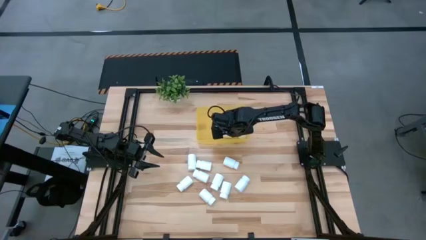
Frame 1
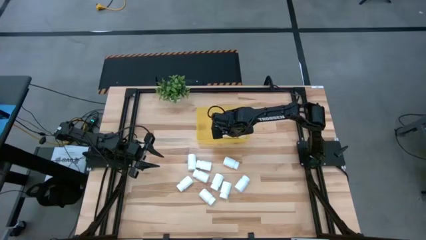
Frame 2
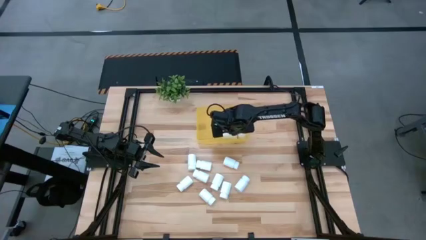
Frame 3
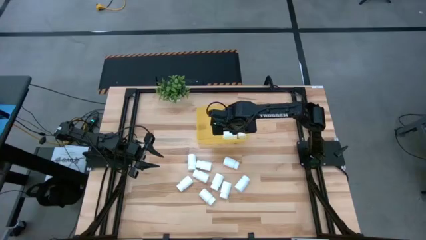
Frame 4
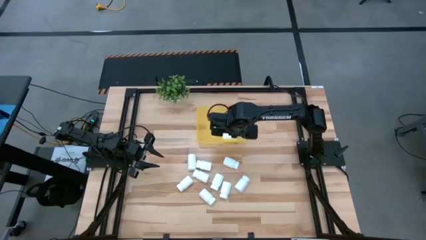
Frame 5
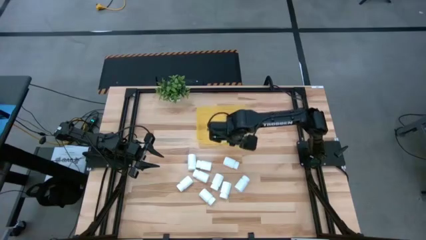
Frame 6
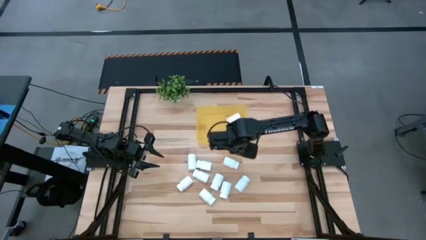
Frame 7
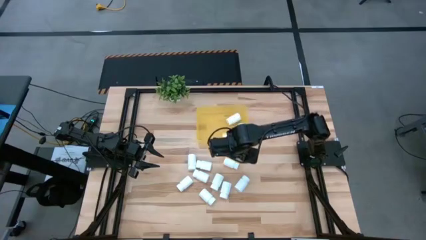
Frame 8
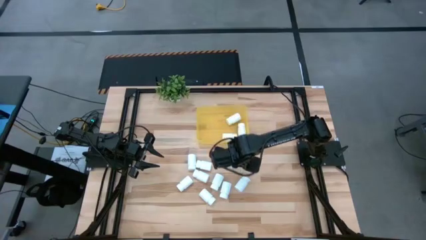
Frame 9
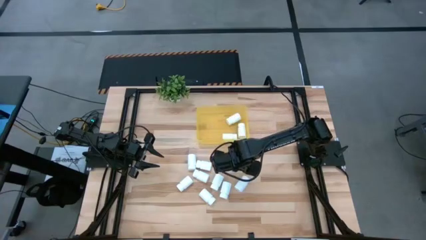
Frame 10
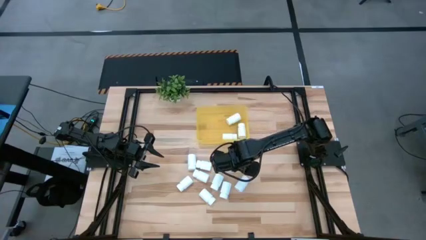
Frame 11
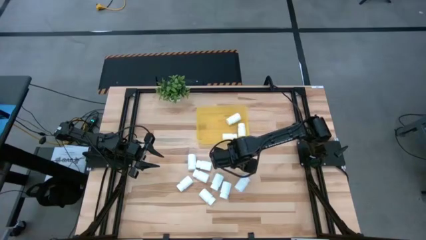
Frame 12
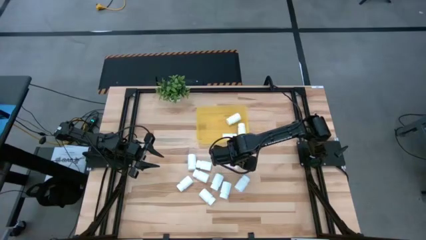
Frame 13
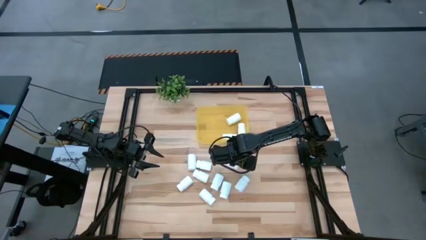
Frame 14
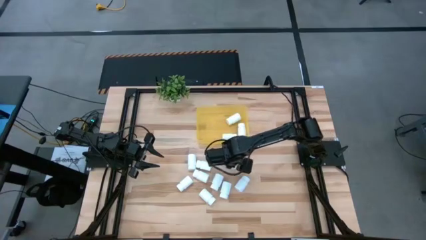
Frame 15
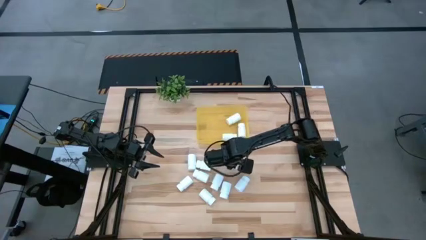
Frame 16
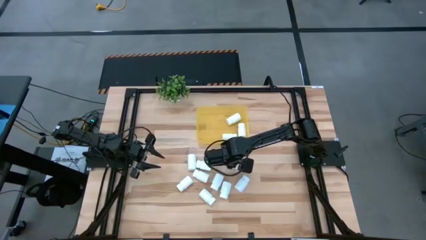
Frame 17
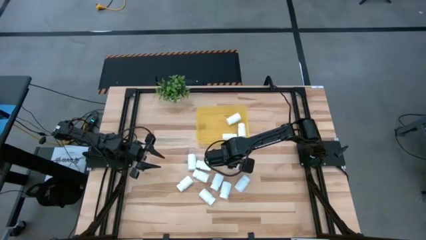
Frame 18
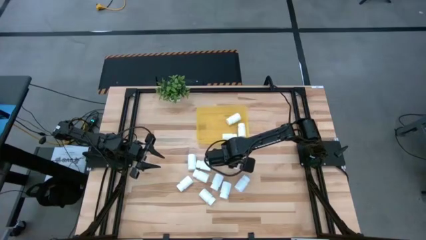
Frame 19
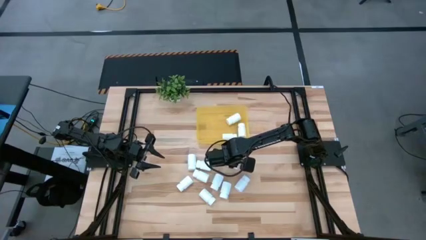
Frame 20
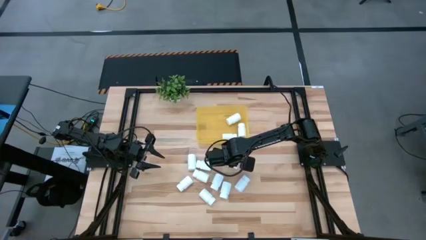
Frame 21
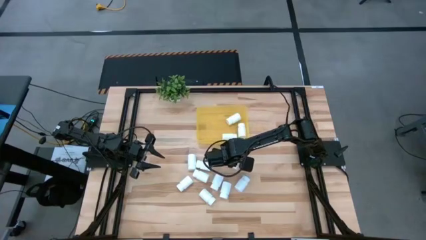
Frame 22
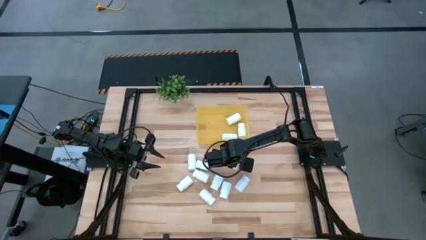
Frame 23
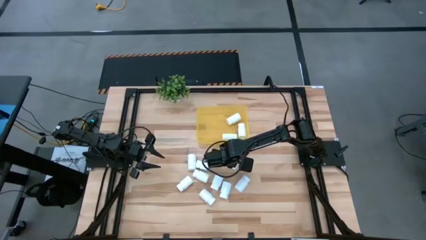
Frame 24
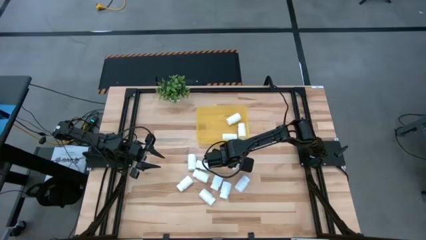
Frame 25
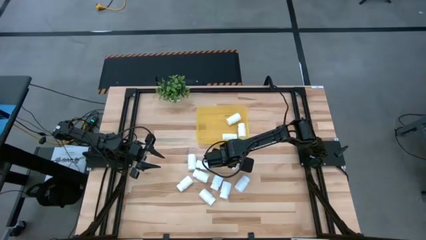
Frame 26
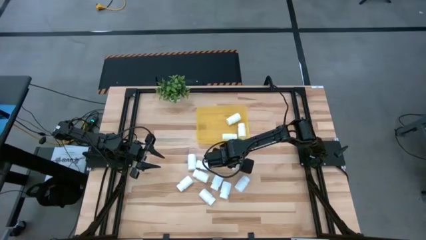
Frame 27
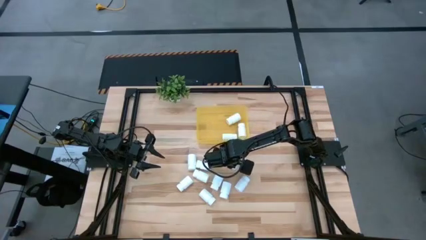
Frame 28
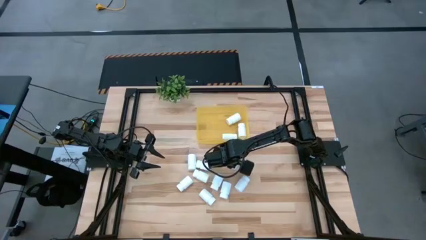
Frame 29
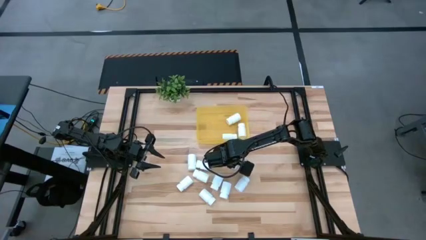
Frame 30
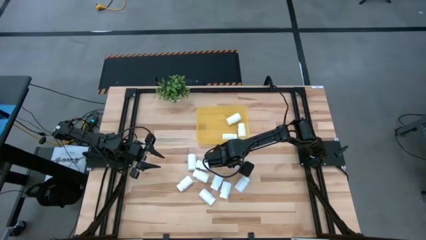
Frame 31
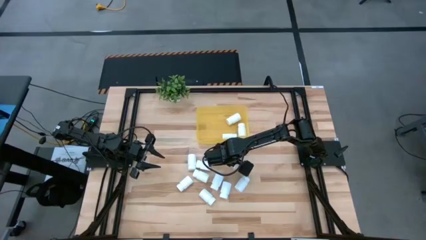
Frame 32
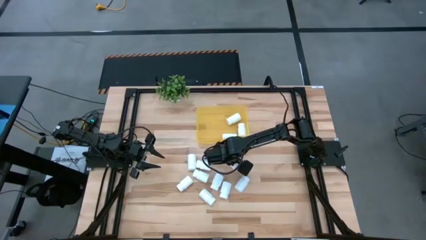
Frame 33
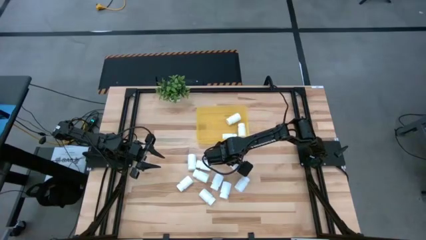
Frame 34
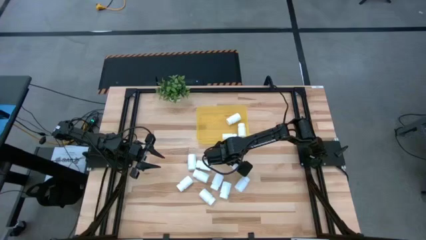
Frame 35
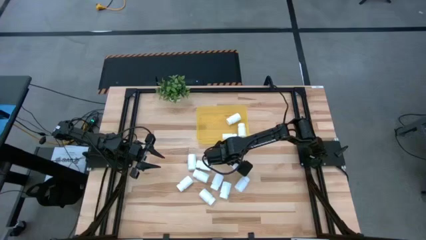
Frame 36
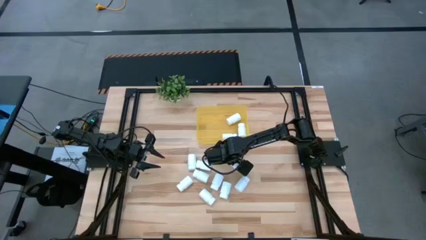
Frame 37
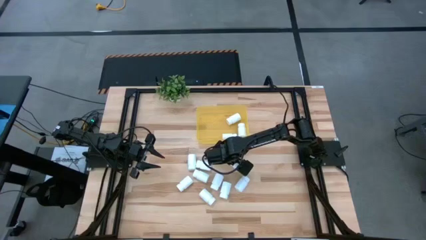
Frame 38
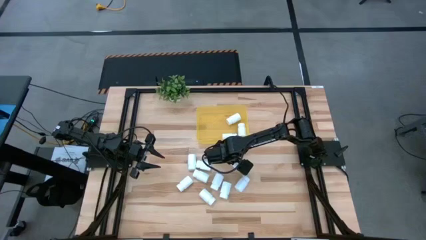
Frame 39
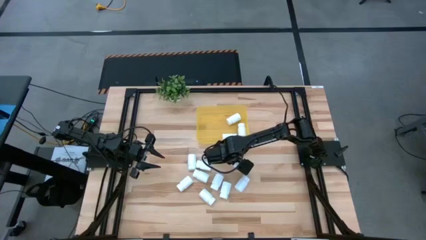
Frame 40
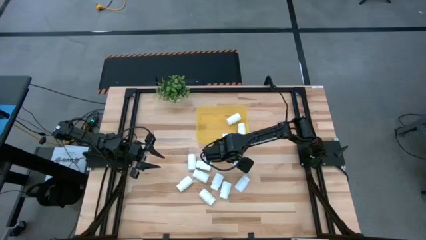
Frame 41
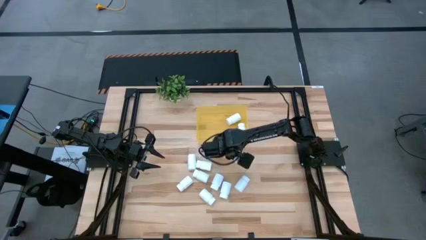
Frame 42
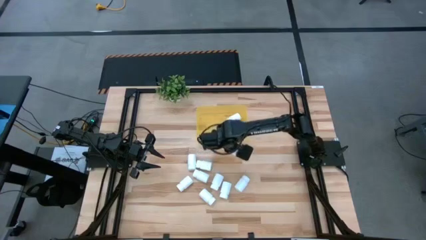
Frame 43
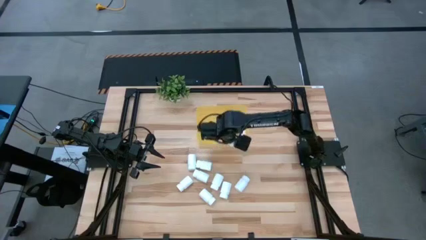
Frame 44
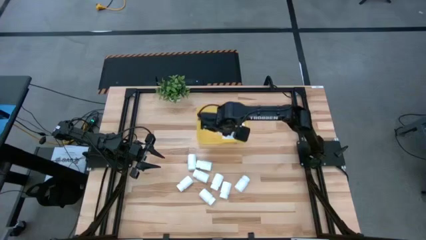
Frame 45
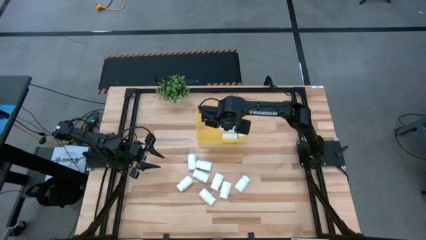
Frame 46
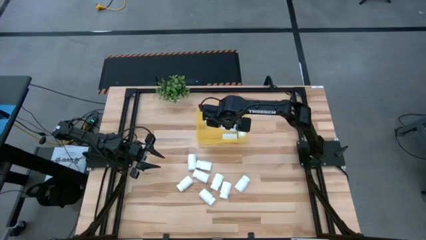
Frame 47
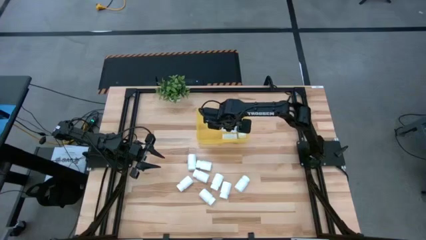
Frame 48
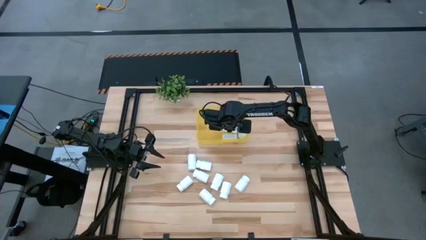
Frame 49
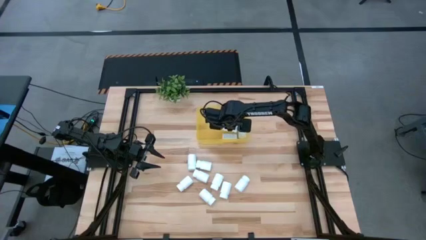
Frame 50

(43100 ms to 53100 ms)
Task: Pick and place pill bottles into a basket
Put the white pill bottle into the yellow bin

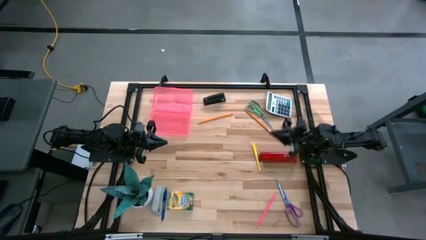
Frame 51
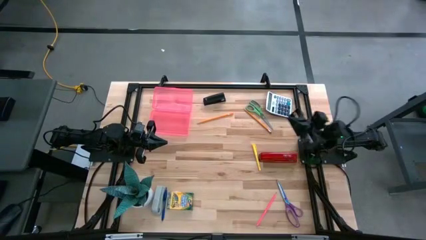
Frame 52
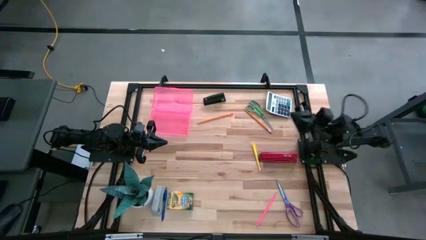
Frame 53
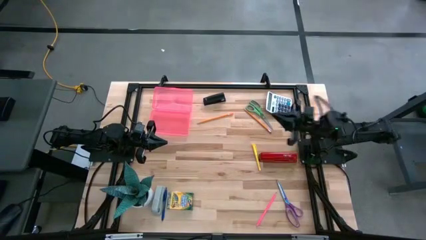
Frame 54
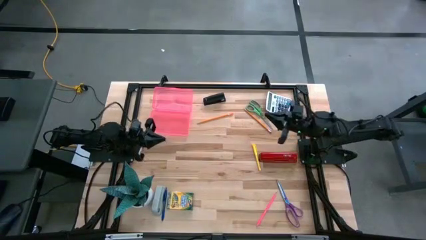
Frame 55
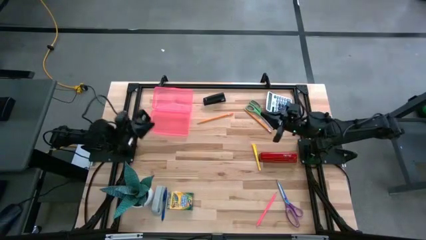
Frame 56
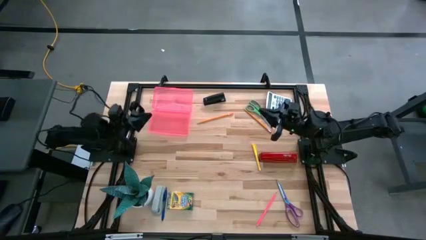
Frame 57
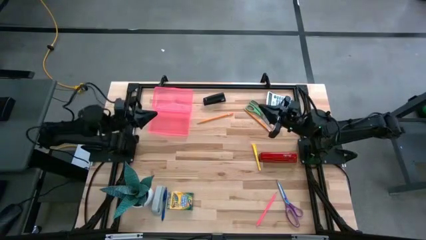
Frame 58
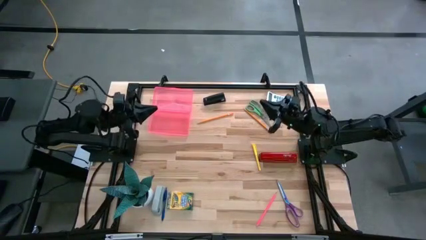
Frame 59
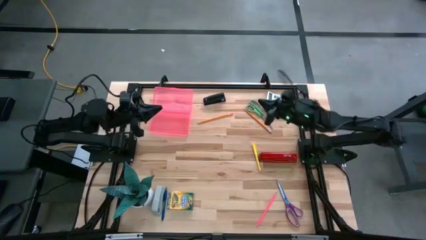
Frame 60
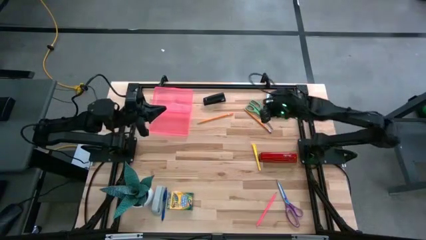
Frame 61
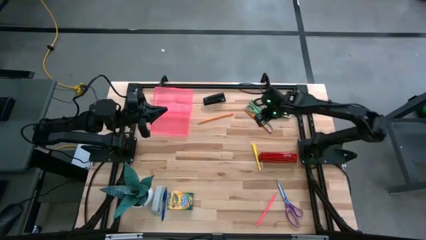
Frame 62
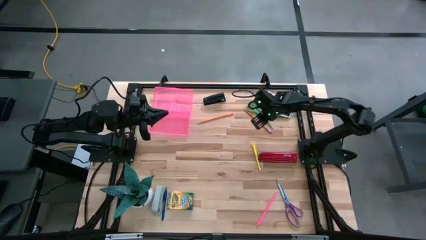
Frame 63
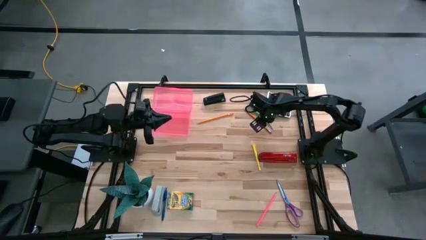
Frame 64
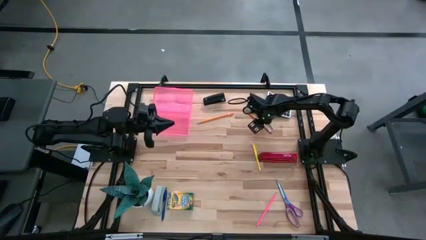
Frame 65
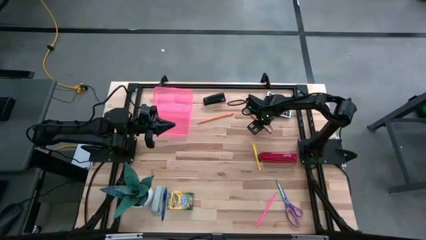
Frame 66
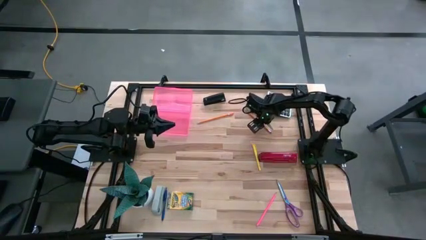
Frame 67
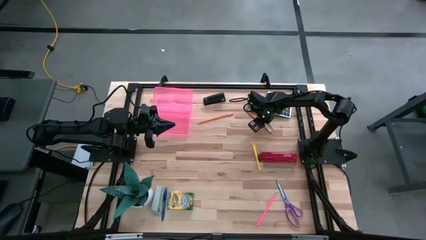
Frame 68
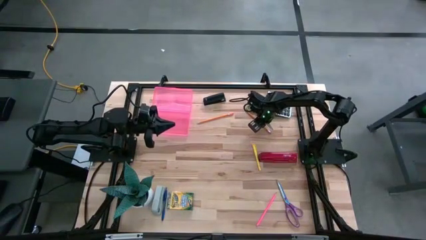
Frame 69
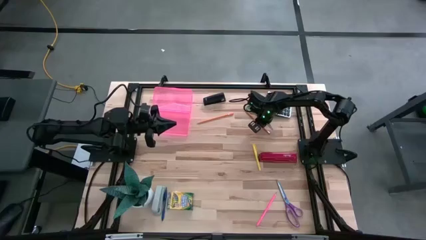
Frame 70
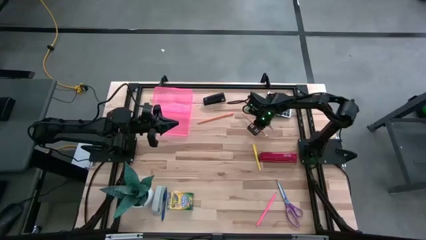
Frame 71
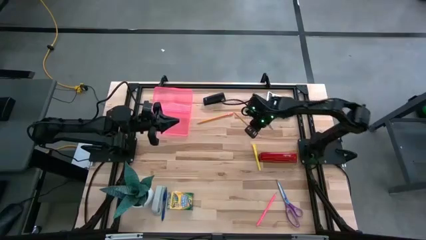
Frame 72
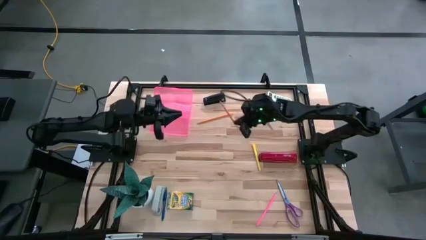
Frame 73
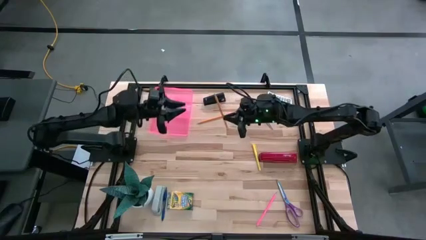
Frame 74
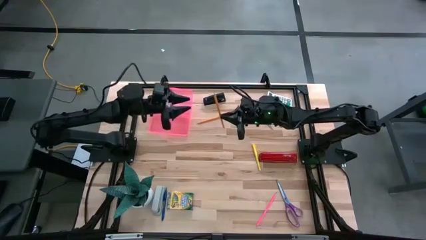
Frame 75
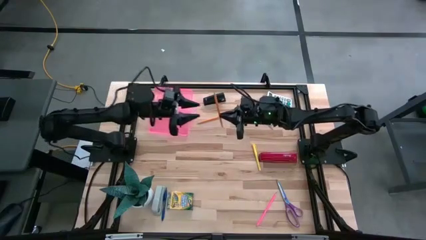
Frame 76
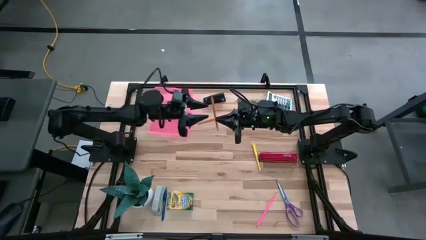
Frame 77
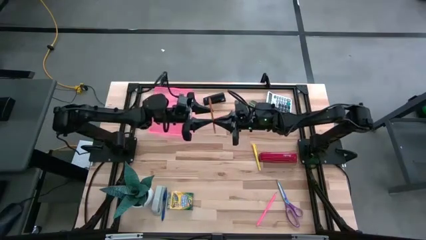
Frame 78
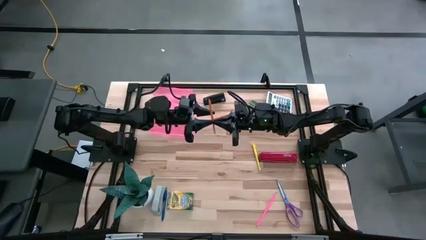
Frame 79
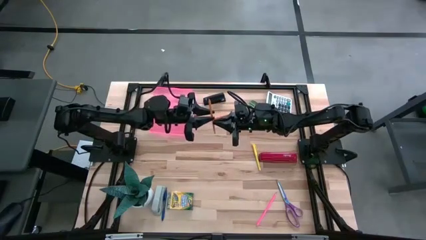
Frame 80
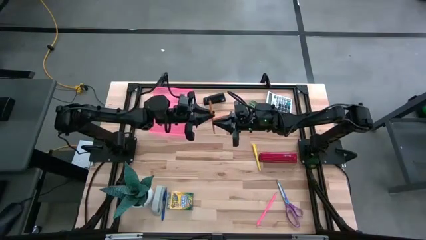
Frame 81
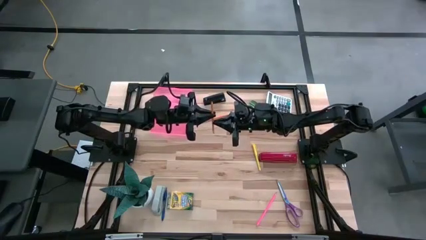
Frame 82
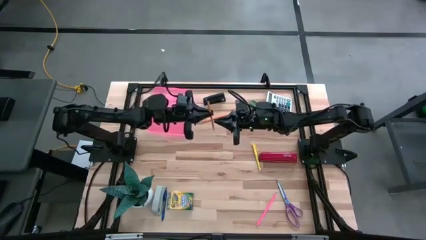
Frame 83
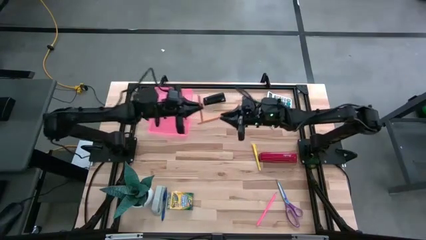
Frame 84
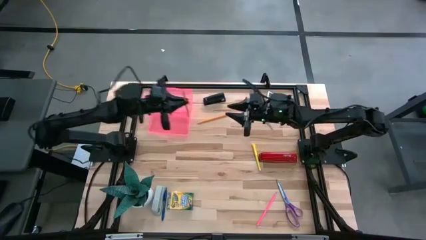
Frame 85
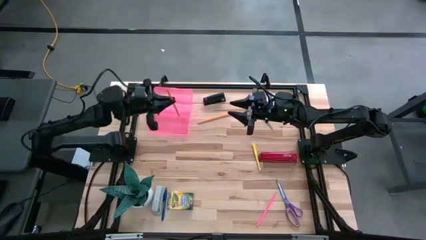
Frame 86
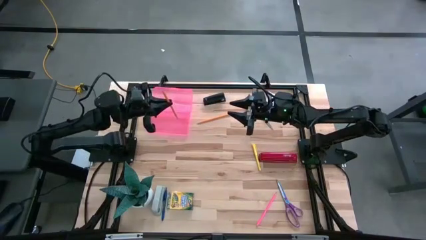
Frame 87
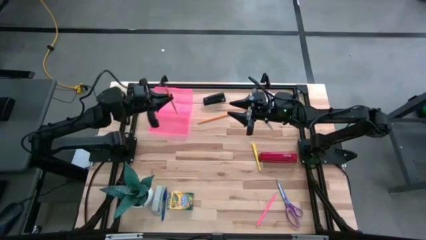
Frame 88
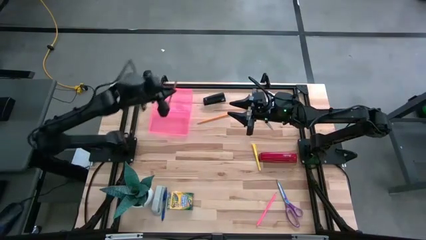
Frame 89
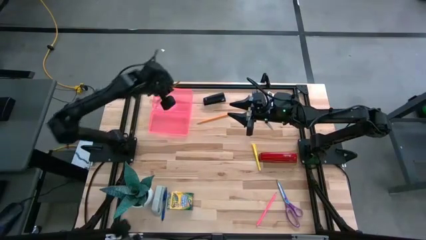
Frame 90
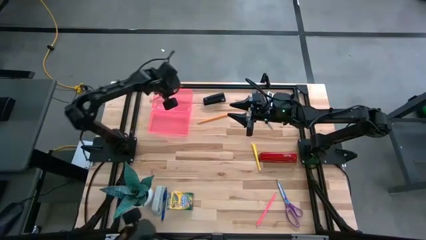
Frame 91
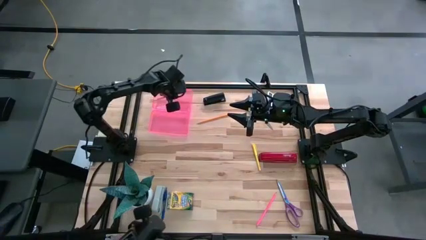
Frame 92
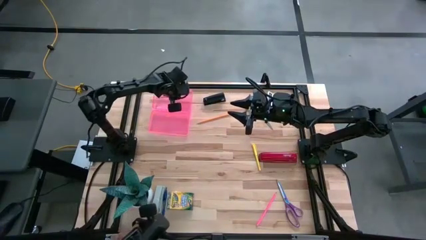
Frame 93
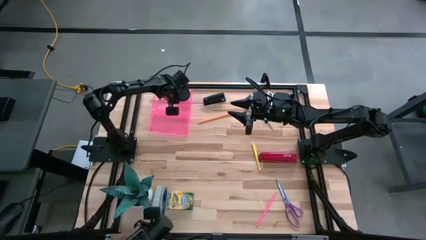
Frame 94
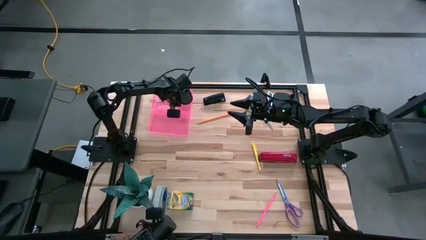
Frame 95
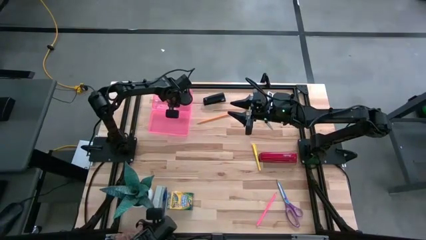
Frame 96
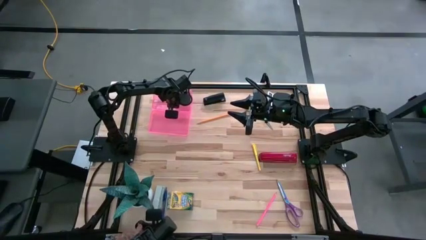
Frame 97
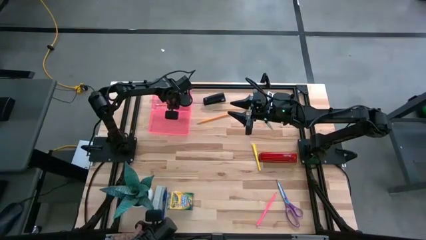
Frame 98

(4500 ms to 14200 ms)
Task: Pack school essentials
Put the right orange pencil into the pink supply box
